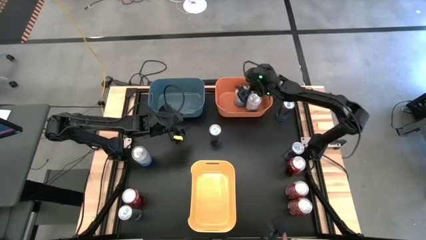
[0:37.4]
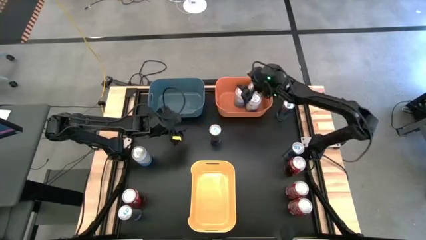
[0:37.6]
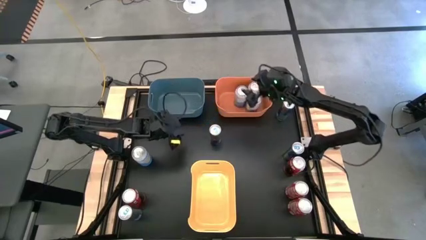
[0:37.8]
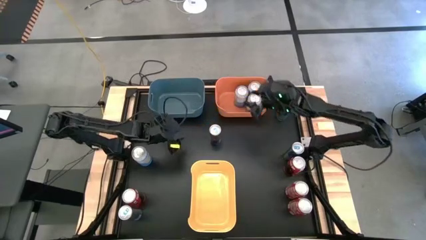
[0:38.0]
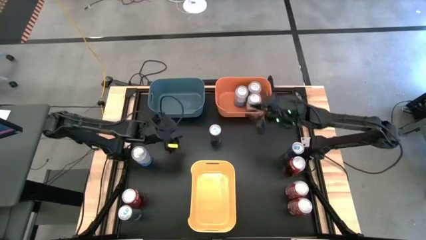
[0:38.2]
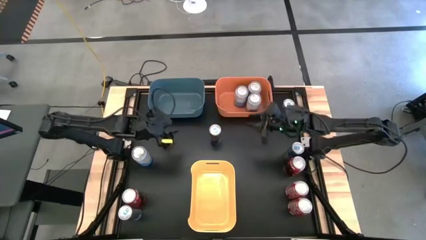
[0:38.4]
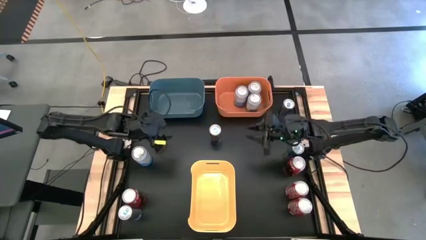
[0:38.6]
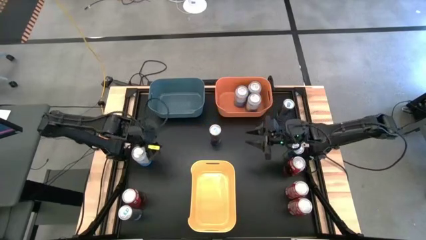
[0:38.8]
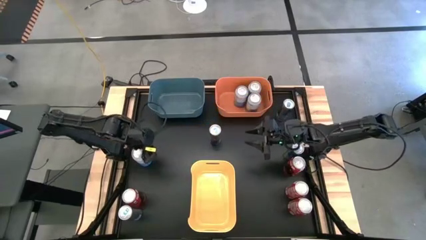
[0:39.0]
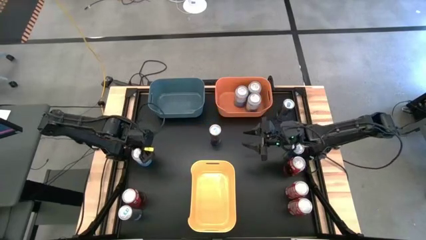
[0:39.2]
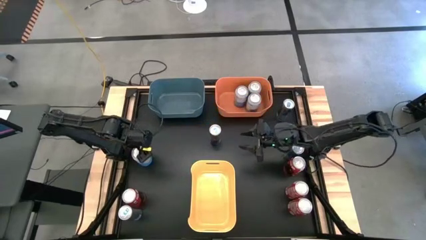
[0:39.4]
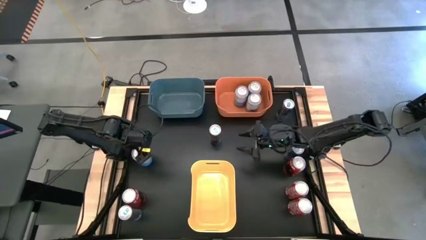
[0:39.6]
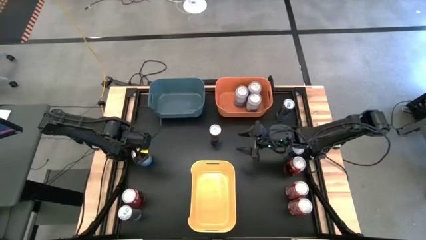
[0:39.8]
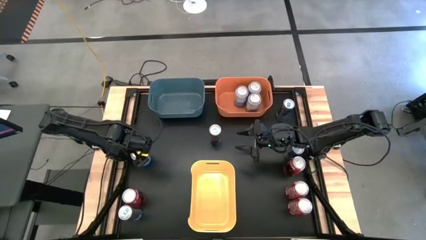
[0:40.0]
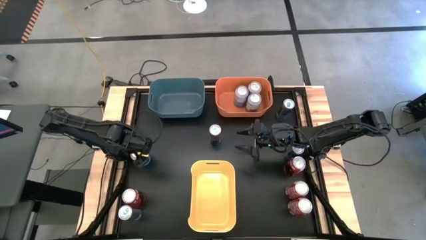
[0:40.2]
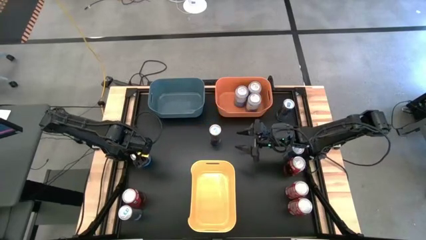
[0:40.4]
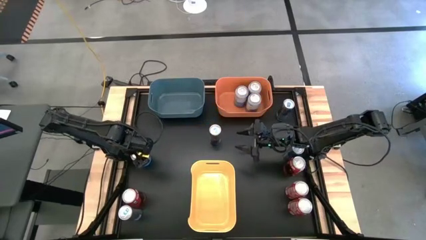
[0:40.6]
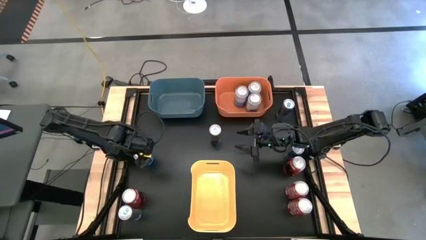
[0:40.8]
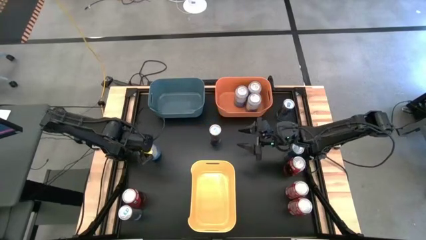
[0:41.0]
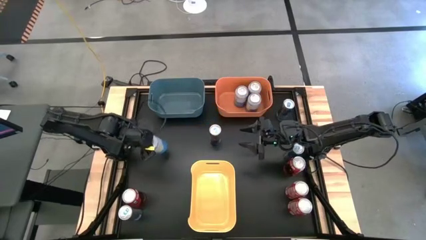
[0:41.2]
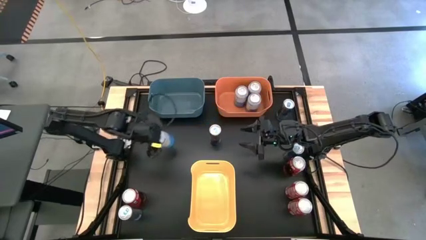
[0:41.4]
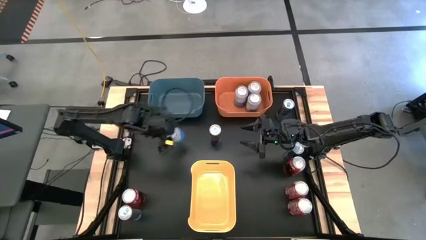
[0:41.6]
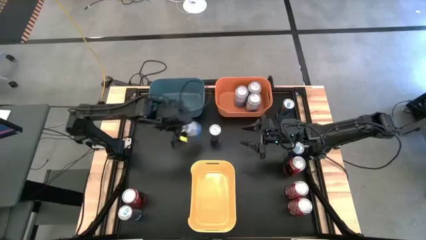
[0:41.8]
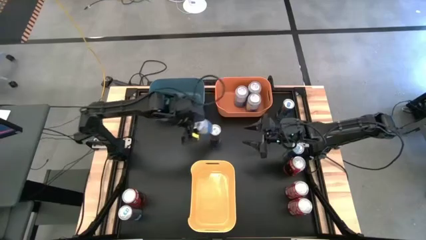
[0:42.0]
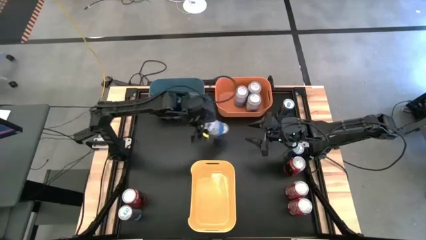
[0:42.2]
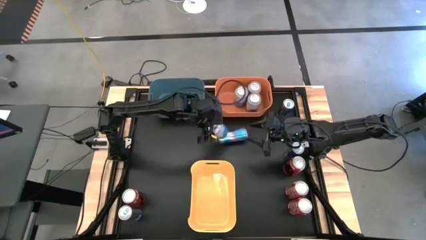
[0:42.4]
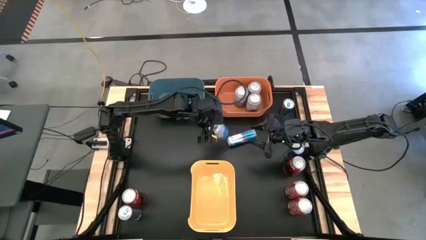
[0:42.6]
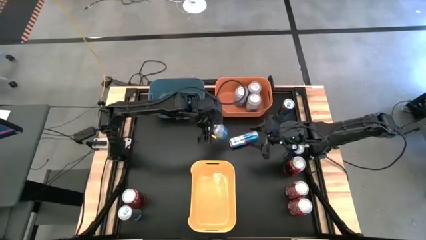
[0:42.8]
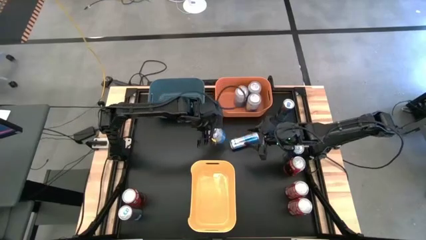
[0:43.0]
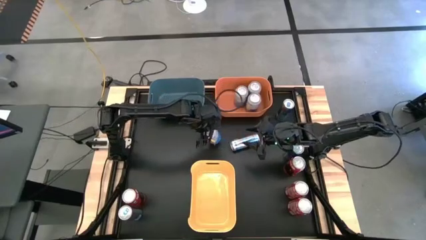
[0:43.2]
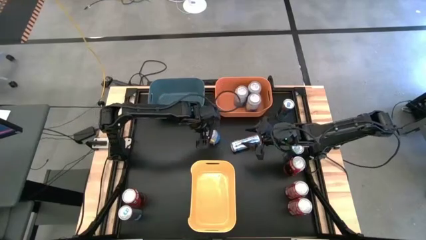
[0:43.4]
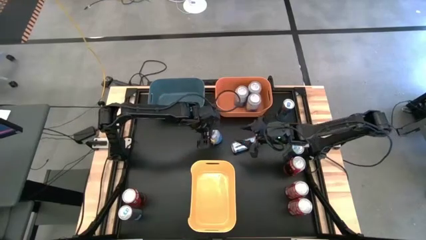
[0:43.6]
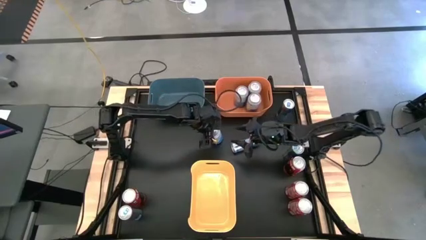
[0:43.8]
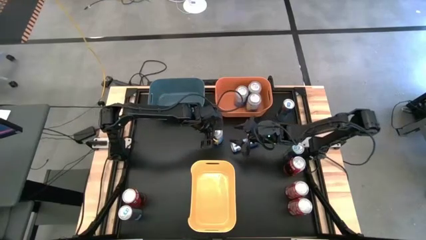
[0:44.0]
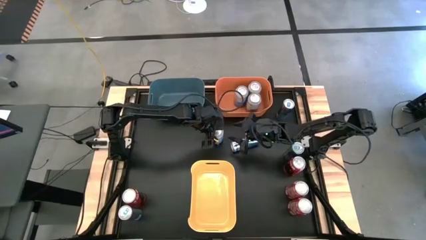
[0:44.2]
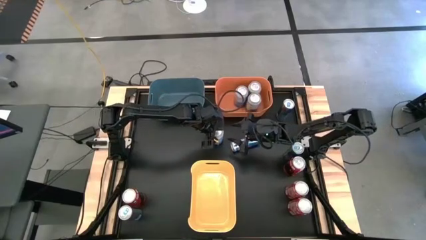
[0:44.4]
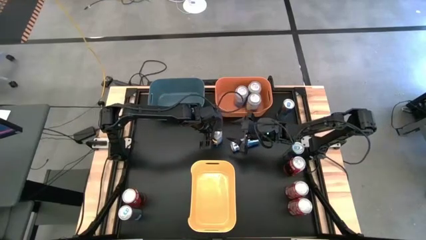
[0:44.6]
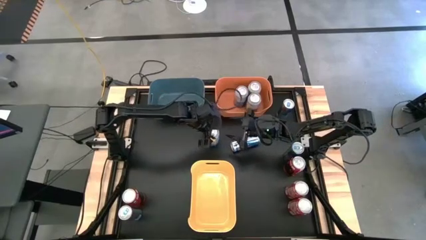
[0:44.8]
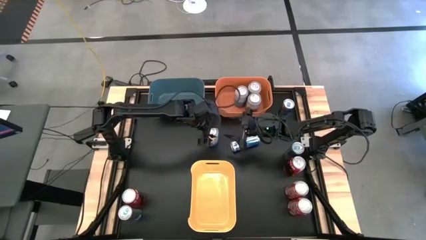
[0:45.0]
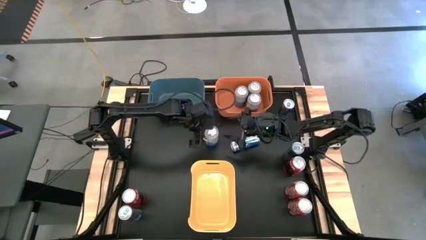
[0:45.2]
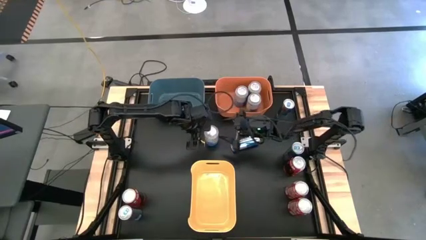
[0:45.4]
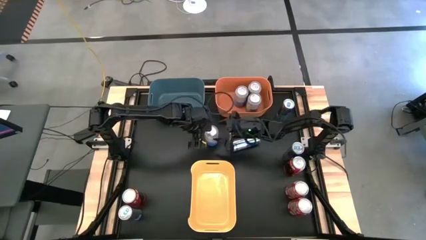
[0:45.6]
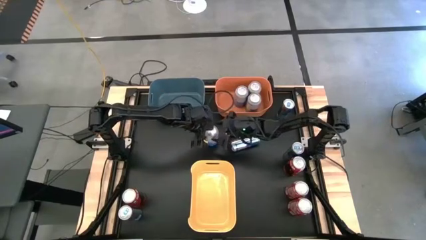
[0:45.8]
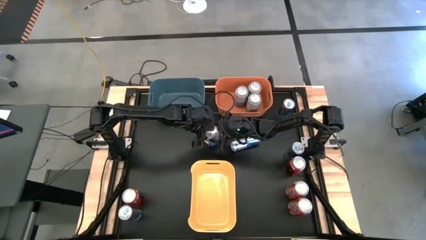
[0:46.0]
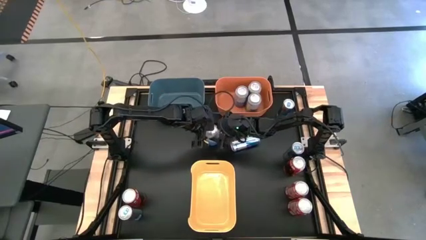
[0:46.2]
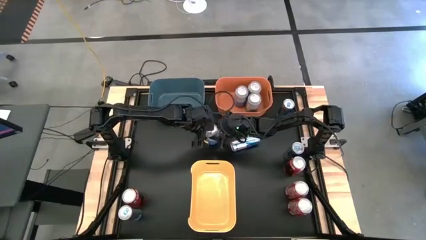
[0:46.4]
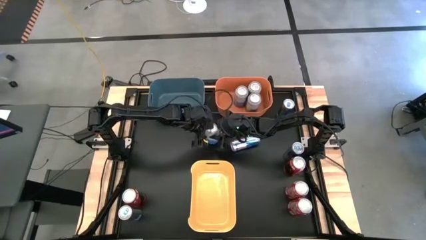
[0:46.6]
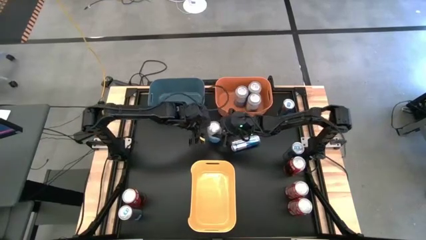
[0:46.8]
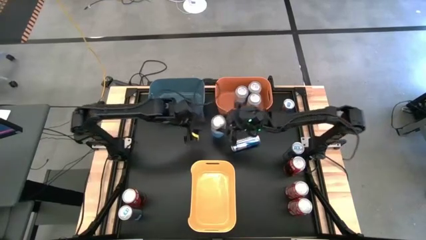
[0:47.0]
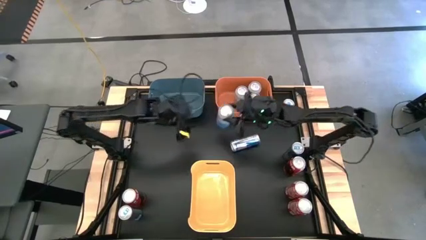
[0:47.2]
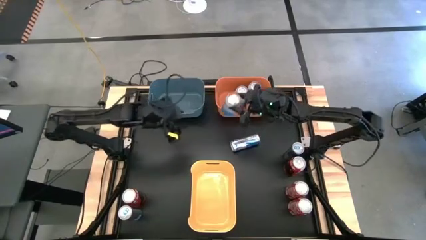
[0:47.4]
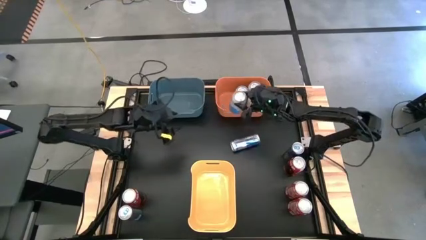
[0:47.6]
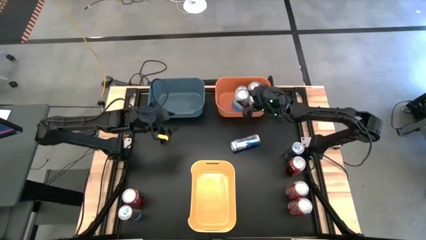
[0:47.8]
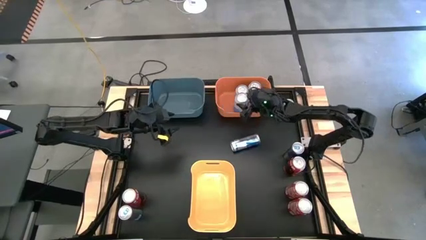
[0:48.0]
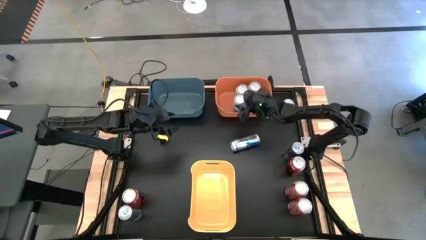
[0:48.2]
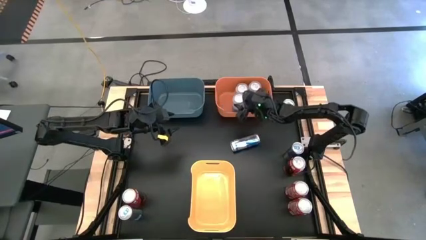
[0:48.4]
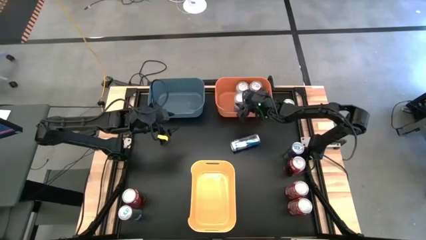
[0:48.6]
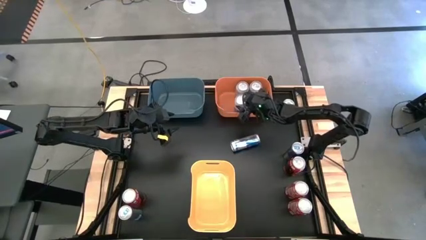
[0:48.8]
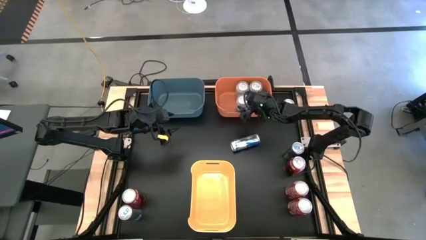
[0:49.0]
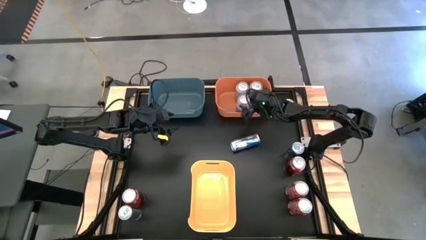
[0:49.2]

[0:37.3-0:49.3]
Task: Sort soda cans
Put the blue white soda can into the orange bin
